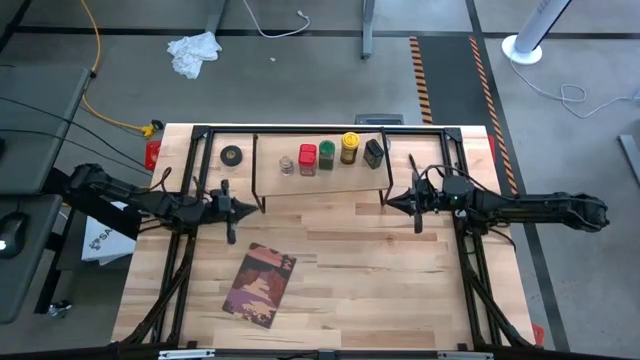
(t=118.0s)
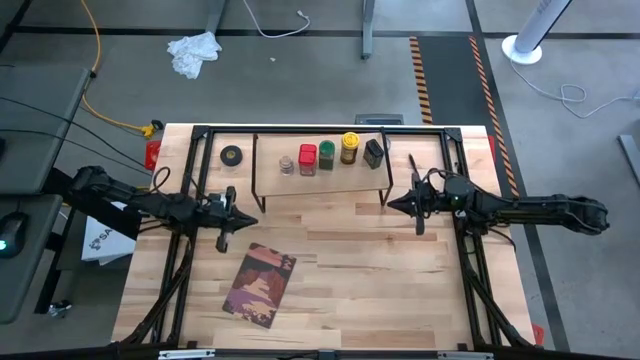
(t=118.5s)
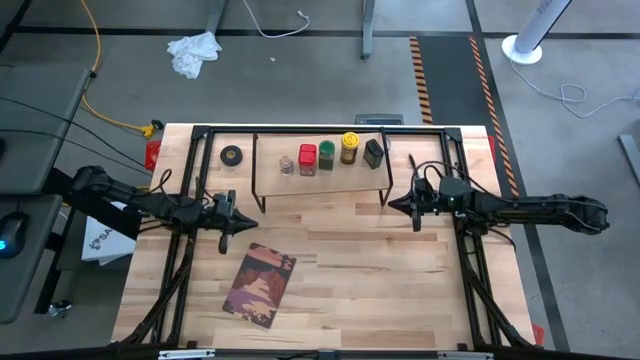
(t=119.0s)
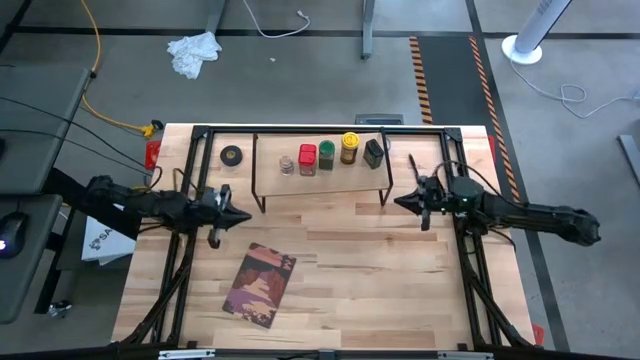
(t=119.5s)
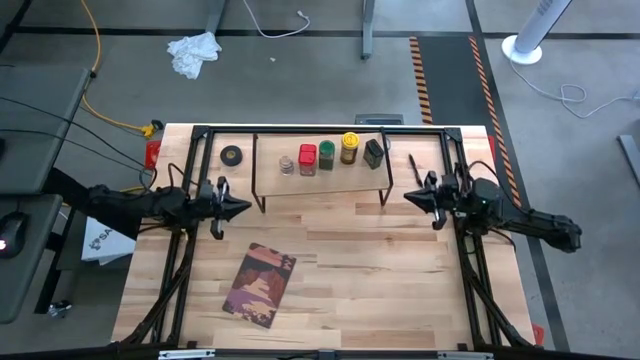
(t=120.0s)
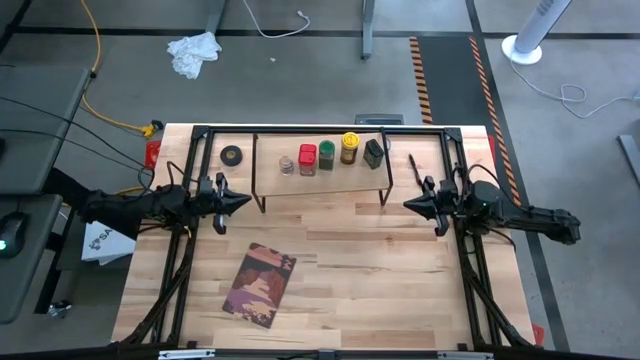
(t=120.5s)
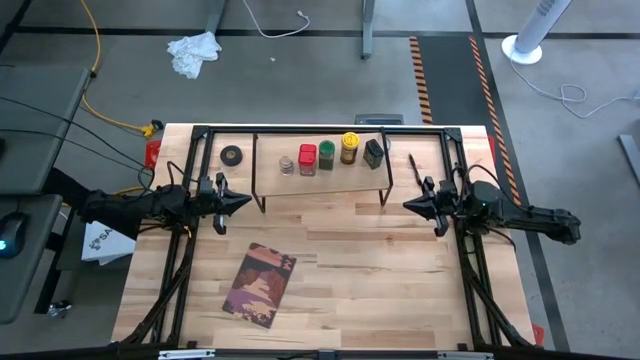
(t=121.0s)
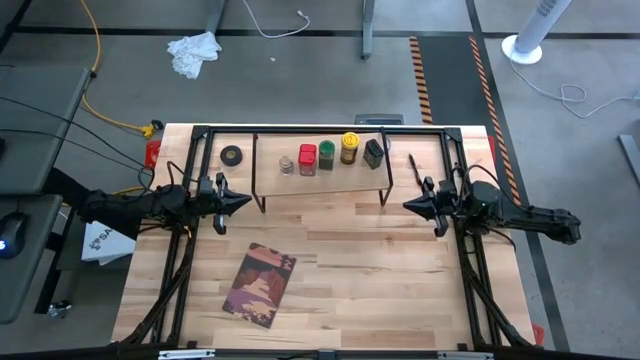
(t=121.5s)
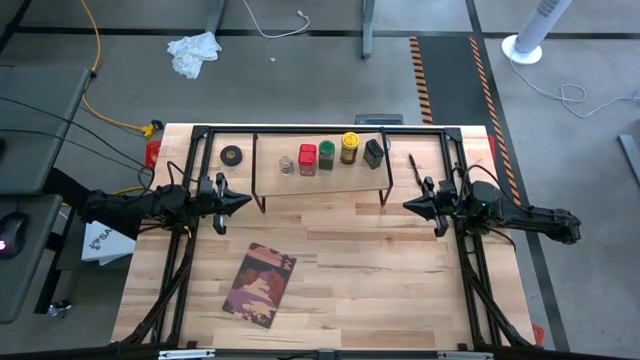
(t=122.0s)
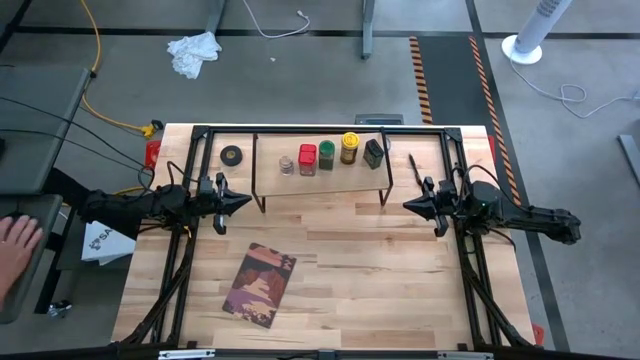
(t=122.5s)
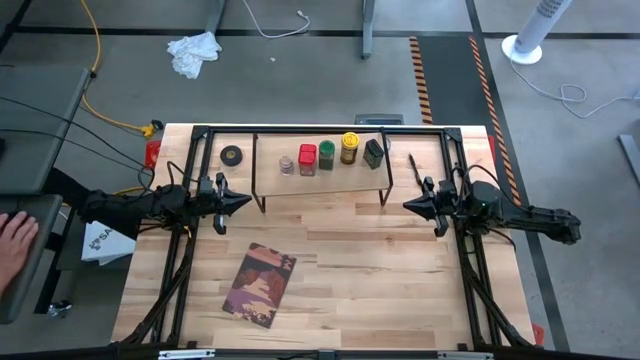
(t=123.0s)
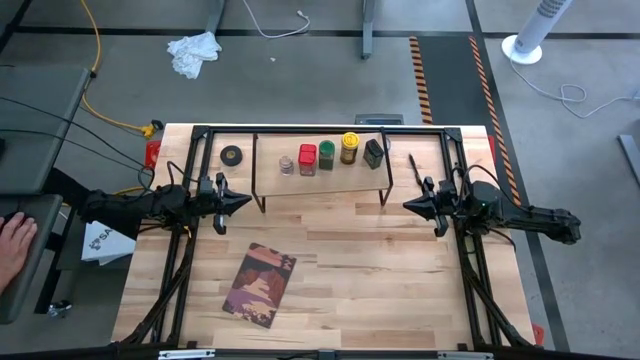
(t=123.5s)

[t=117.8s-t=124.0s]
Task: Shelf spices
Return to Home Position

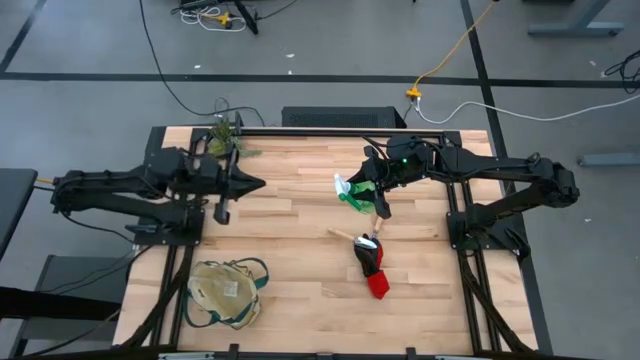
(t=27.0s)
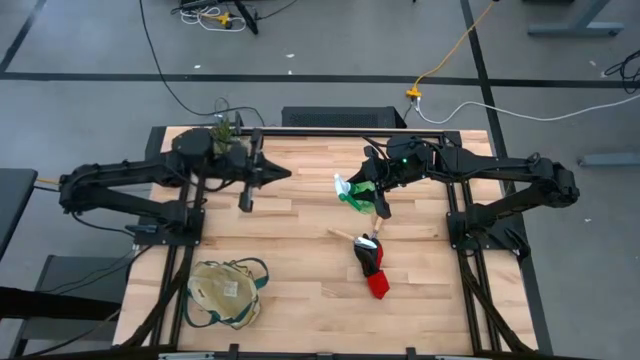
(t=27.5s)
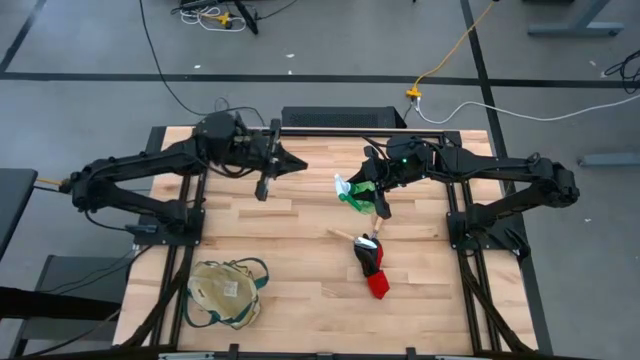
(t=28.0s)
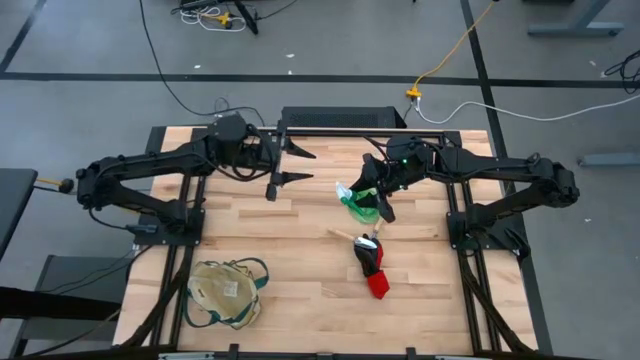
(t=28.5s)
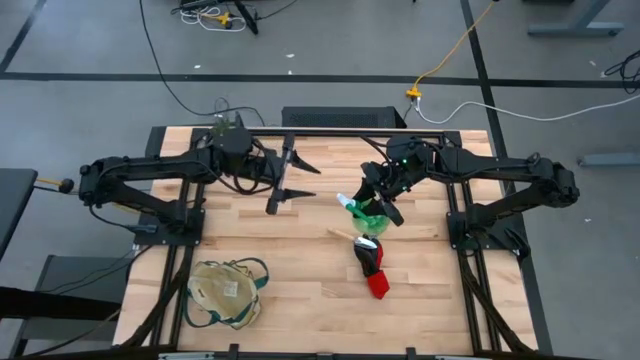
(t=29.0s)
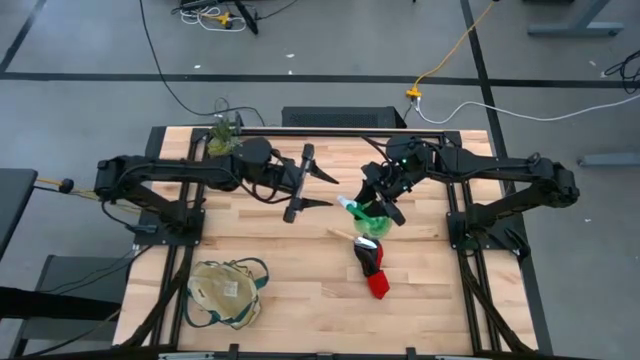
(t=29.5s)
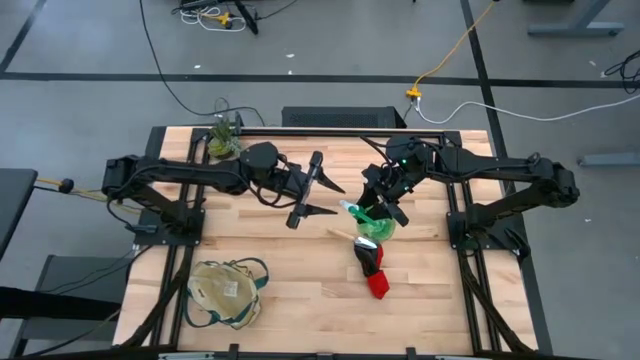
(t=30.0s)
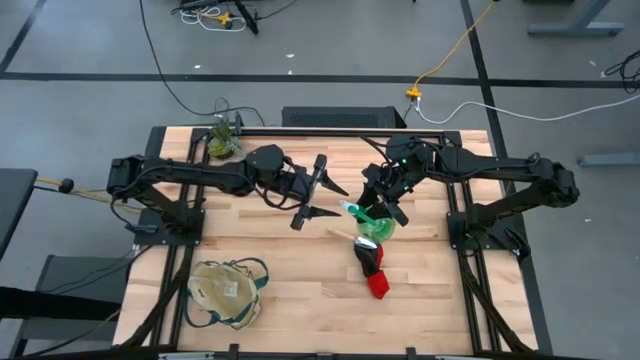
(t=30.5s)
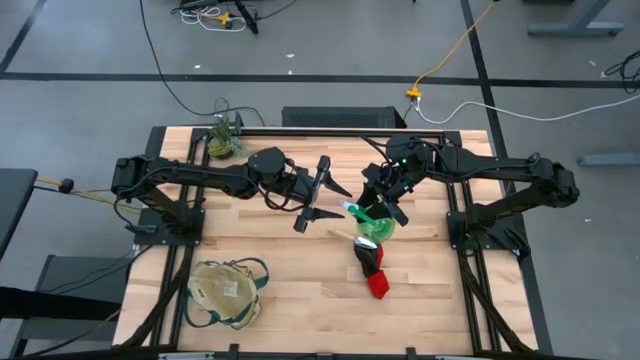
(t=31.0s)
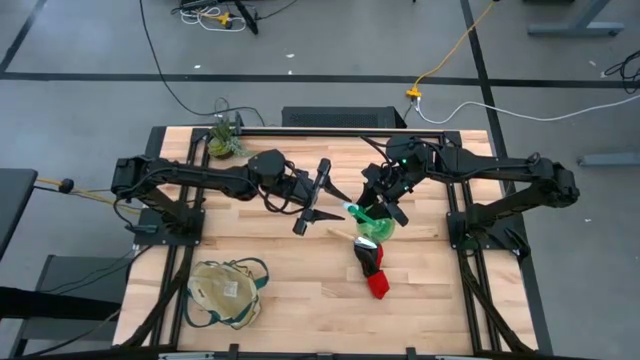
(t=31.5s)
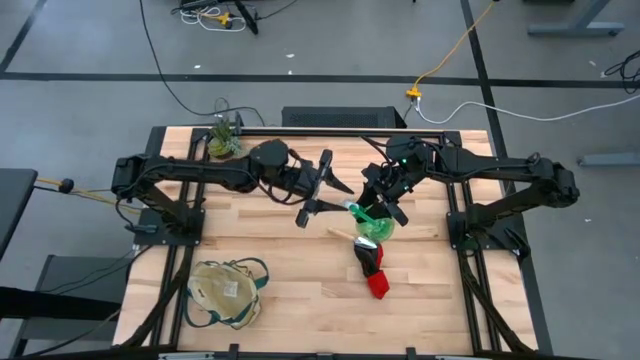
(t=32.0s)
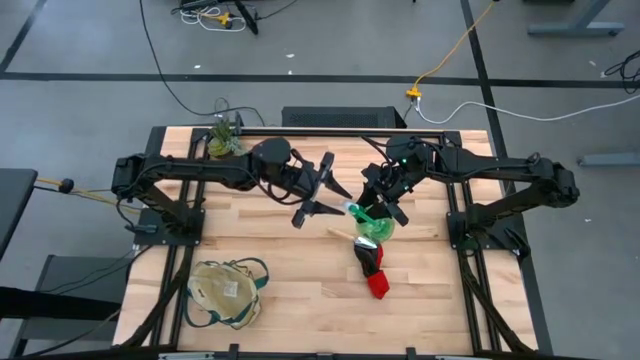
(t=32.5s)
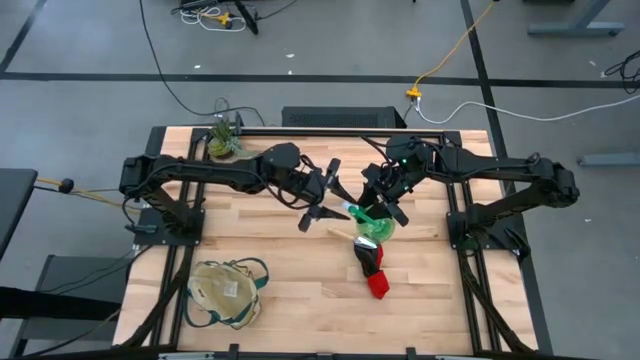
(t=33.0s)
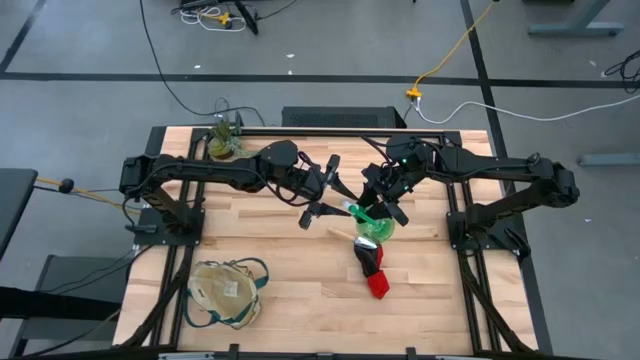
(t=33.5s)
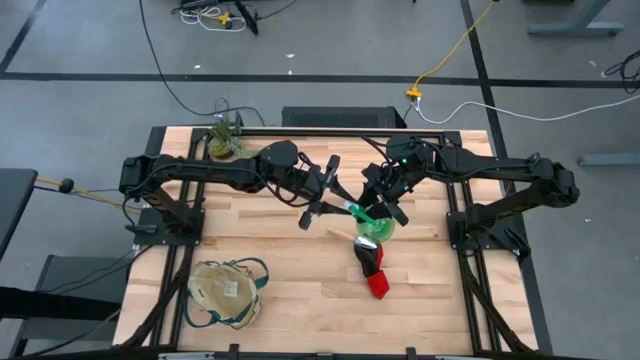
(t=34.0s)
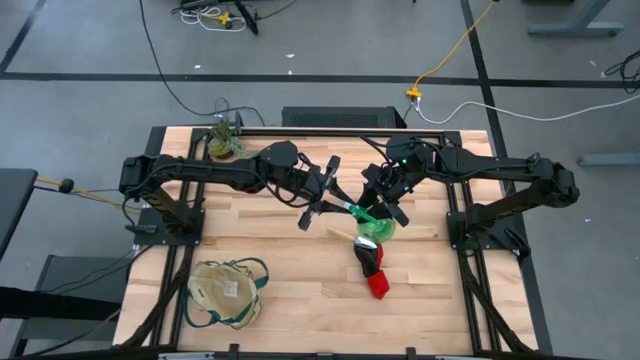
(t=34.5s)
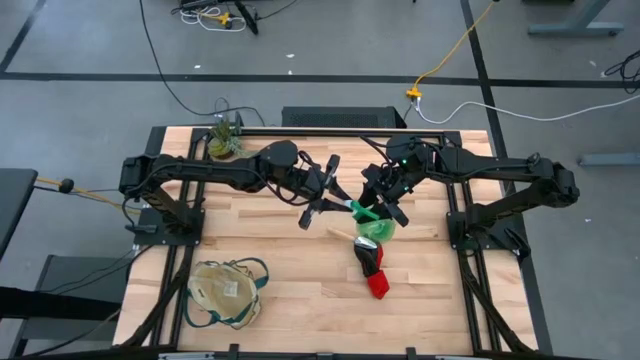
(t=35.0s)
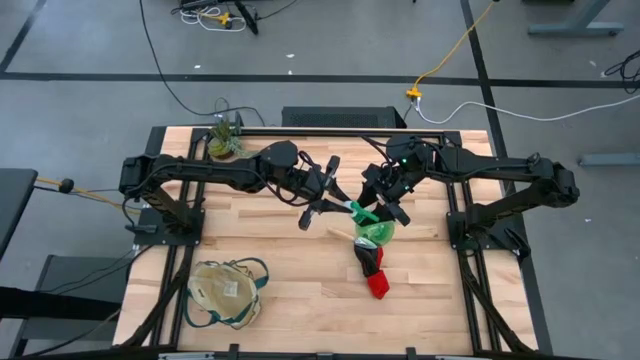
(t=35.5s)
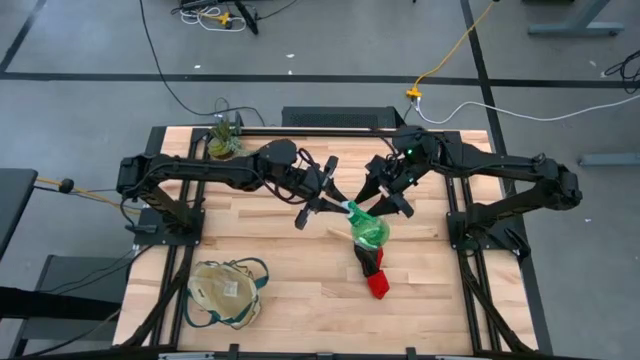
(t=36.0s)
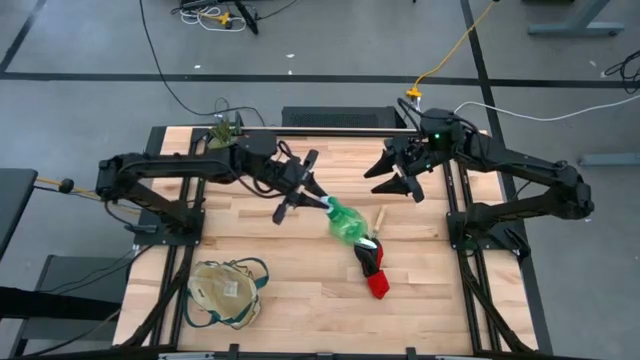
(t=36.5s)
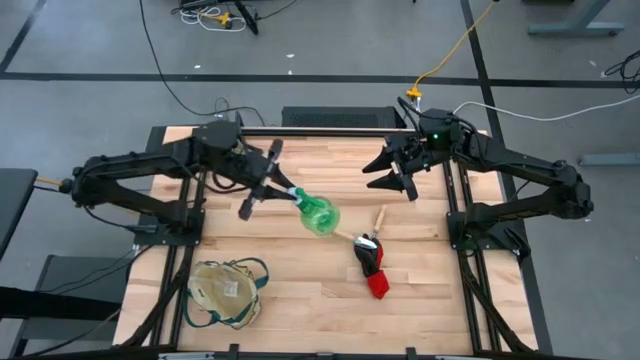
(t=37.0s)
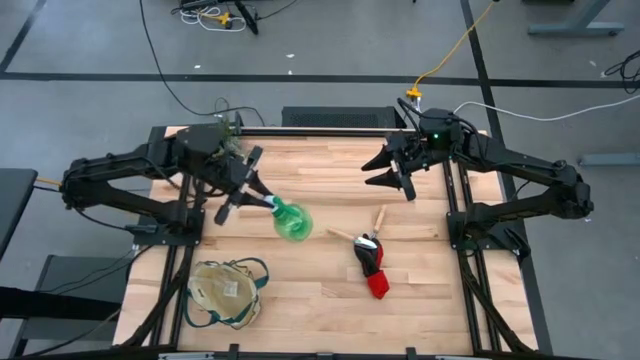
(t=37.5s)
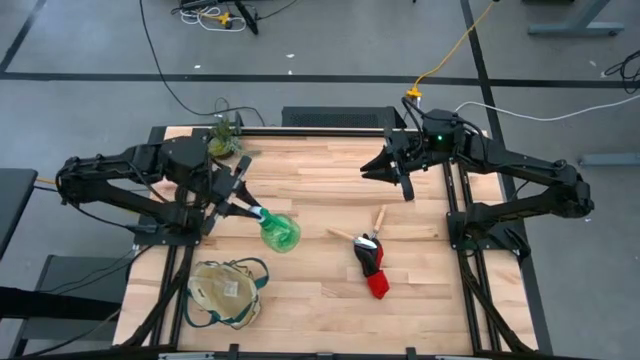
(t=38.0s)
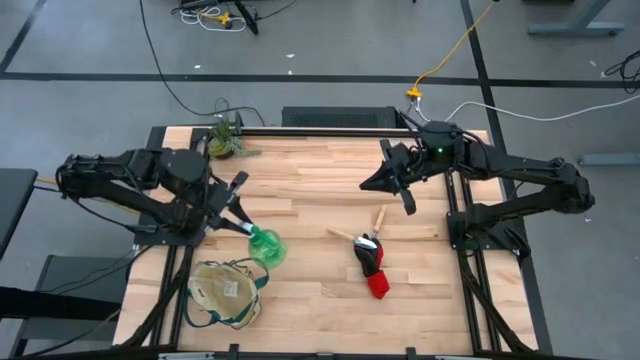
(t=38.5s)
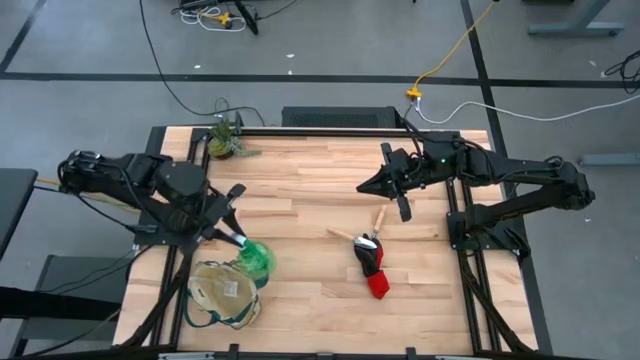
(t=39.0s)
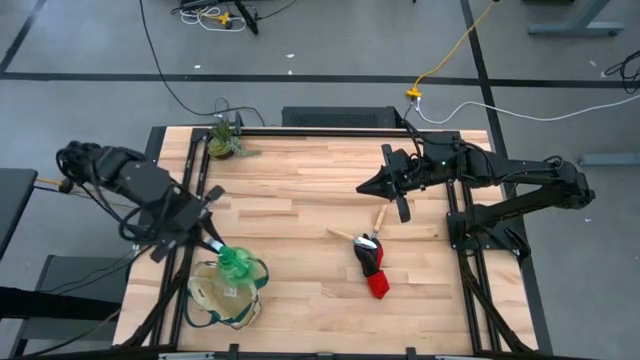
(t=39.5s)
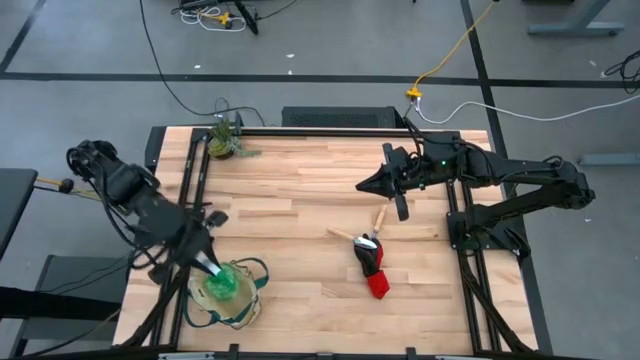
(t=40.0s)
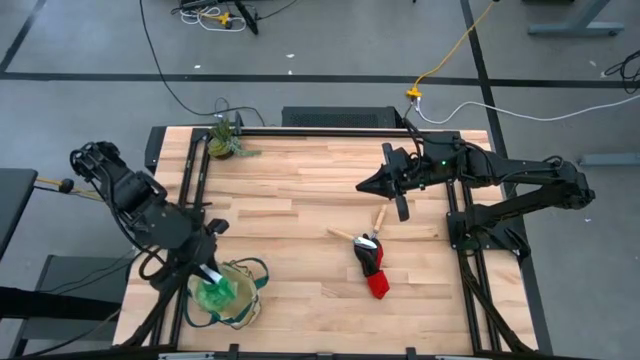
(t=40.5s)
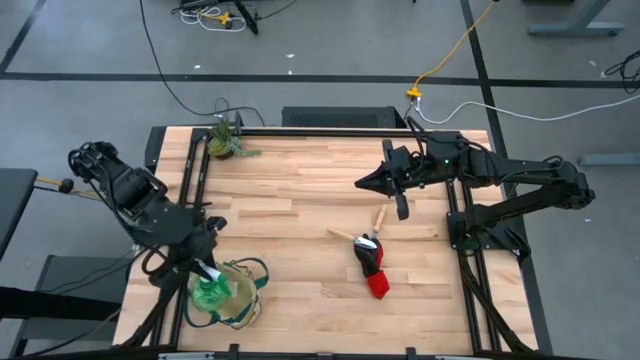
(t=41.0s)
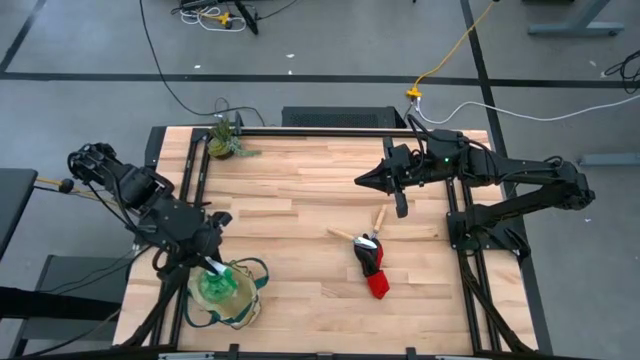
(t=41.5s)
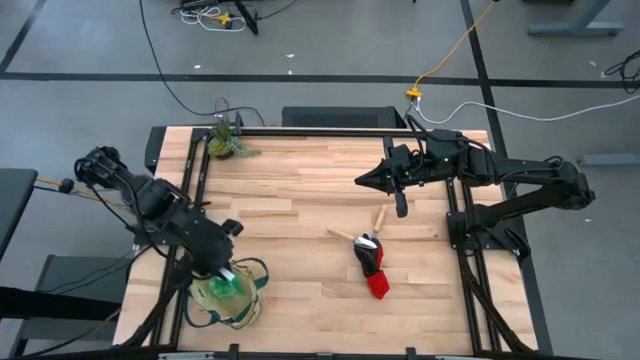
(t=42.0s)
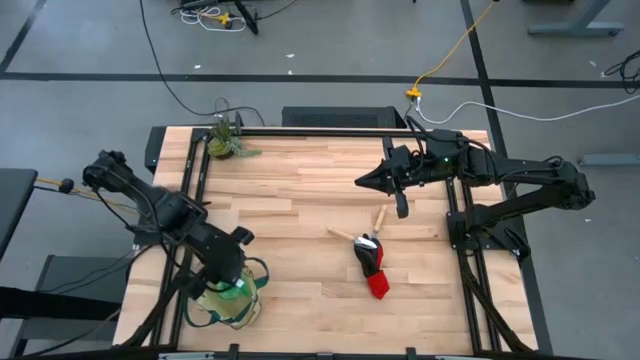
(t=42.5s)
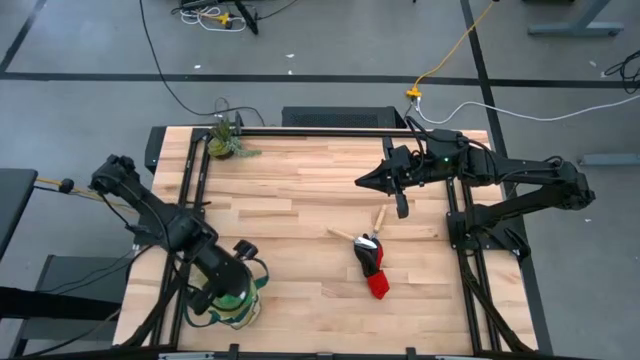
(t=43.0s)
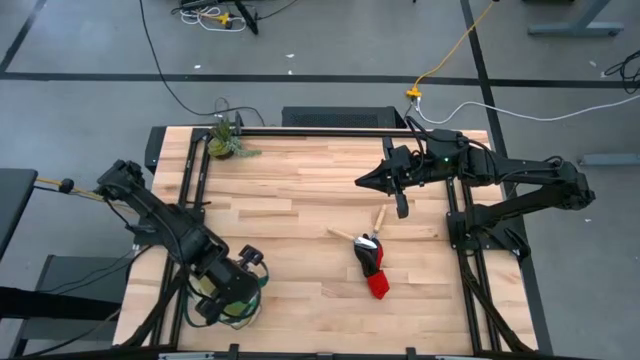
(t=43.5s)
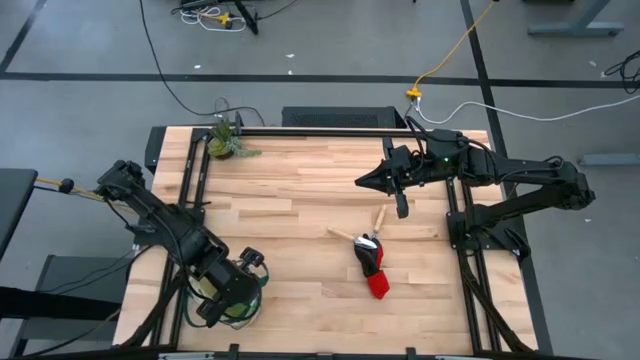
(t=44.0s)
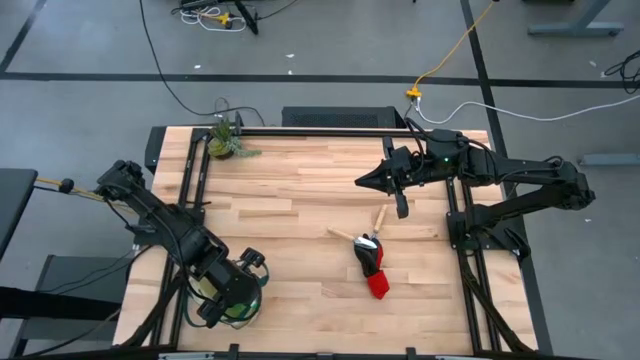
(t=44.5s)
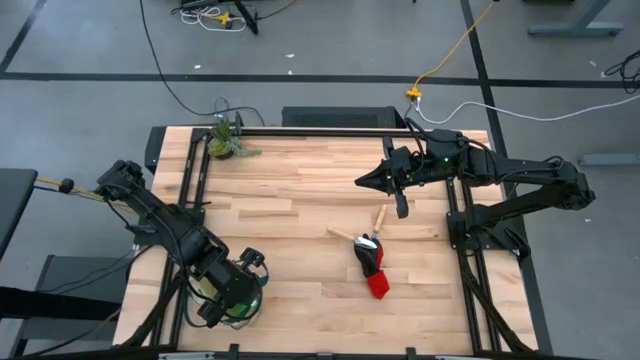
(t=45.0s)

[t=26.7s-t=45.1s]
Task: Pick & Place Garden tools in Gardening bag
Put the green spray bottle into the white gardening bag
